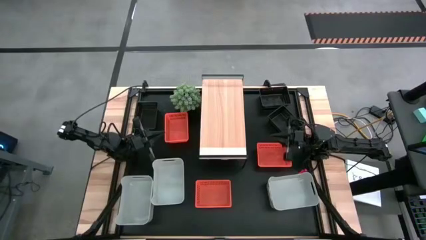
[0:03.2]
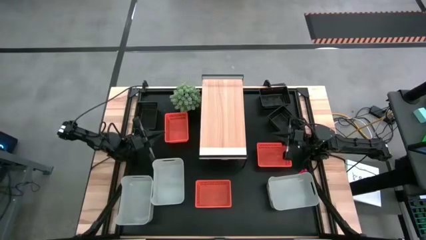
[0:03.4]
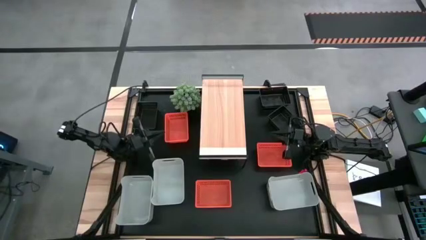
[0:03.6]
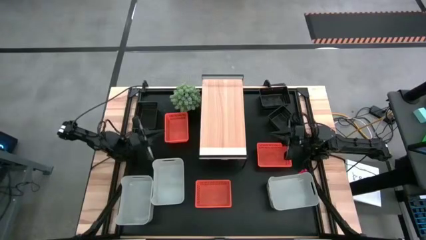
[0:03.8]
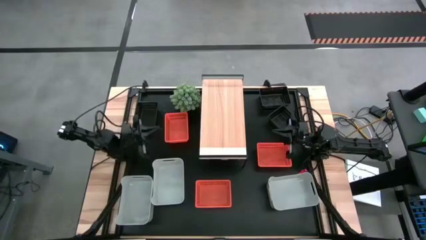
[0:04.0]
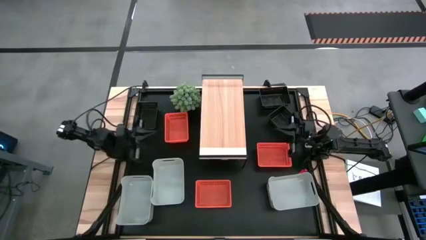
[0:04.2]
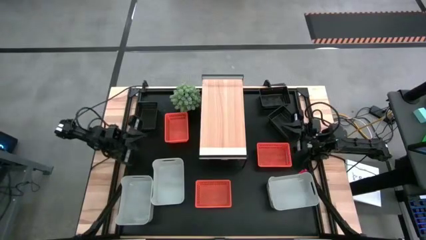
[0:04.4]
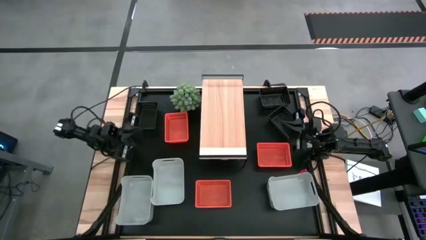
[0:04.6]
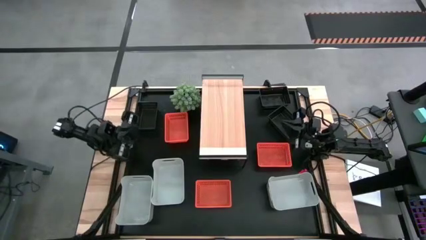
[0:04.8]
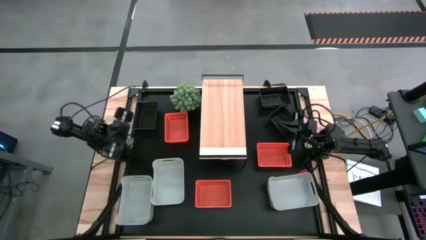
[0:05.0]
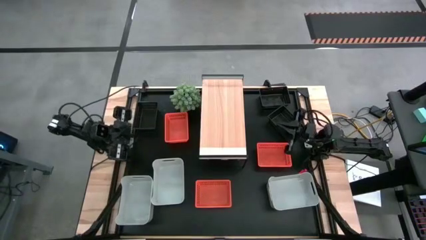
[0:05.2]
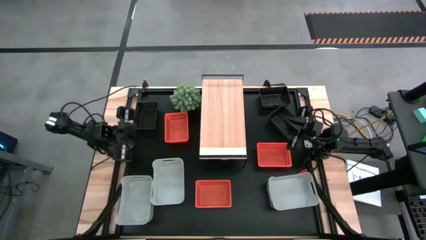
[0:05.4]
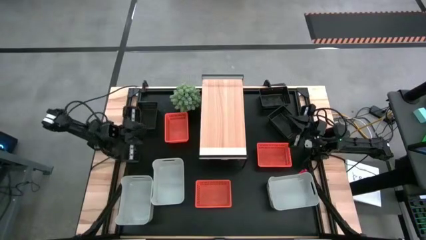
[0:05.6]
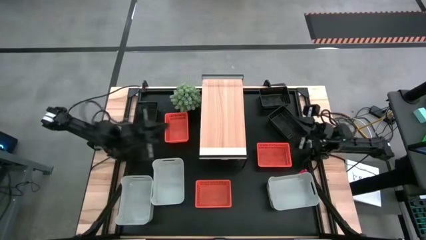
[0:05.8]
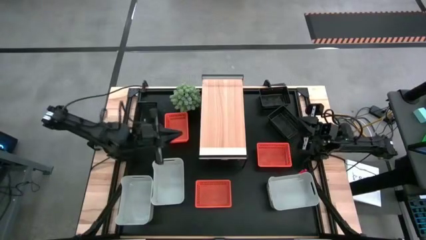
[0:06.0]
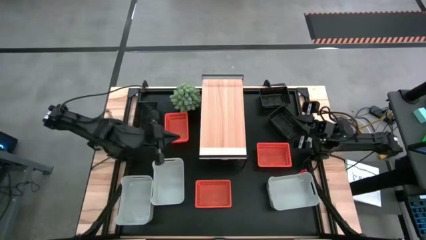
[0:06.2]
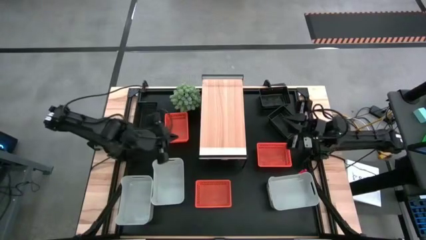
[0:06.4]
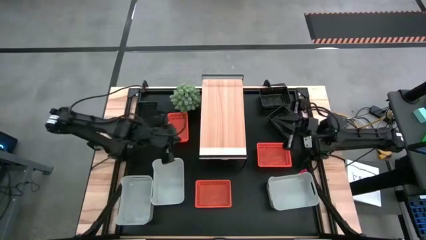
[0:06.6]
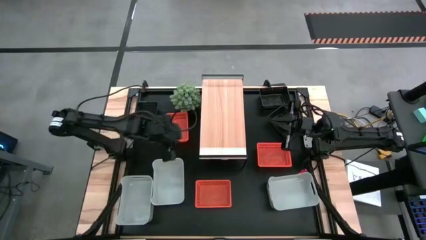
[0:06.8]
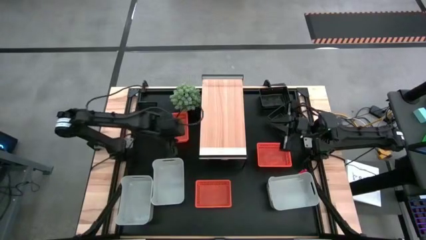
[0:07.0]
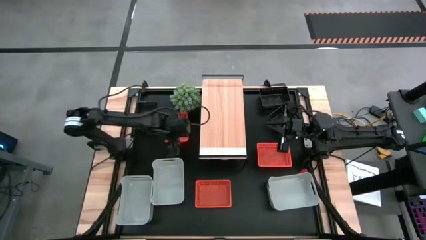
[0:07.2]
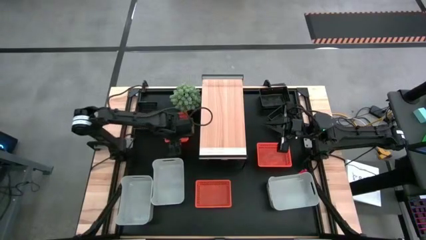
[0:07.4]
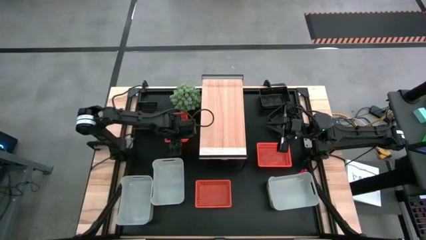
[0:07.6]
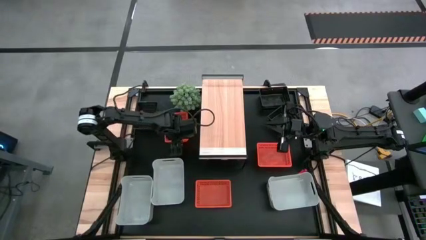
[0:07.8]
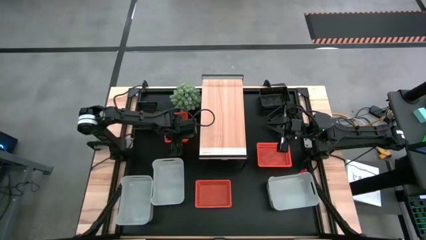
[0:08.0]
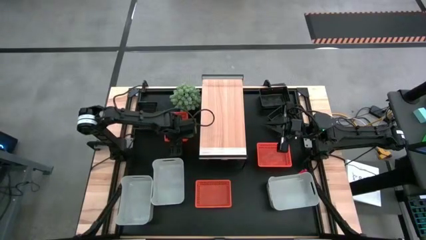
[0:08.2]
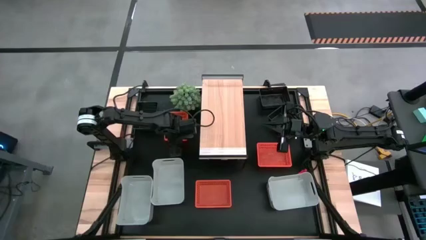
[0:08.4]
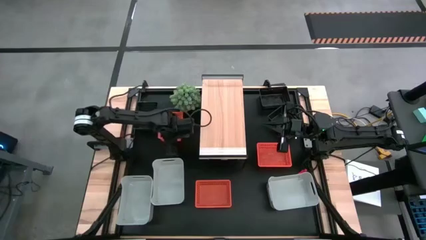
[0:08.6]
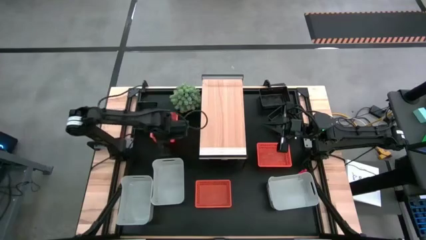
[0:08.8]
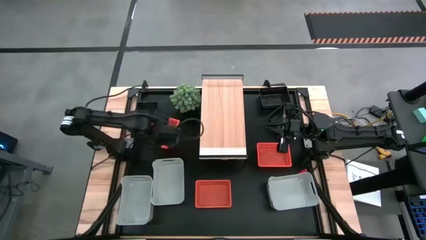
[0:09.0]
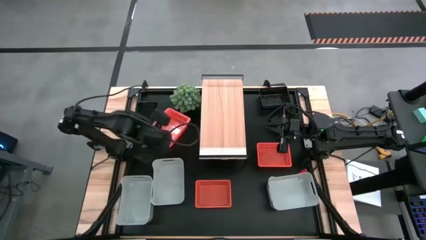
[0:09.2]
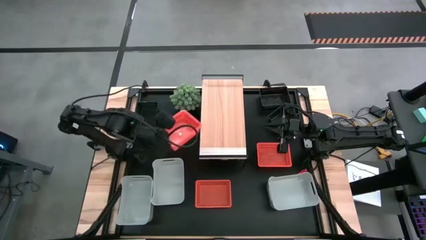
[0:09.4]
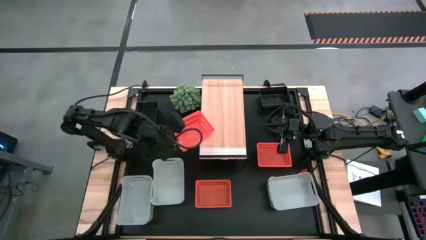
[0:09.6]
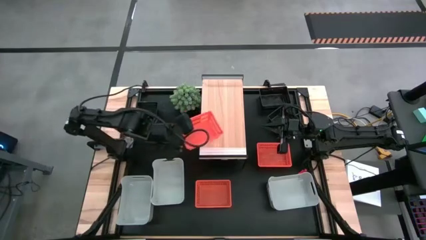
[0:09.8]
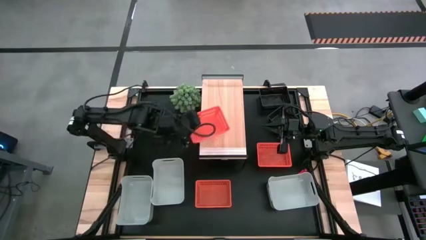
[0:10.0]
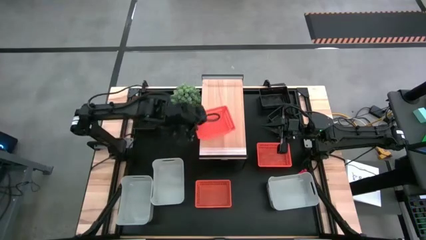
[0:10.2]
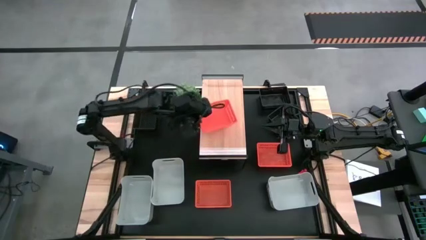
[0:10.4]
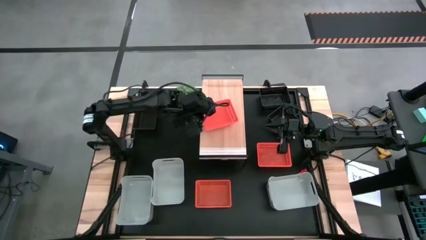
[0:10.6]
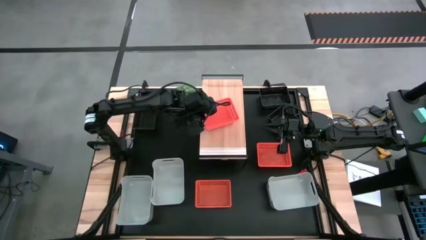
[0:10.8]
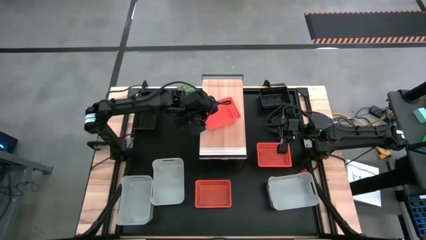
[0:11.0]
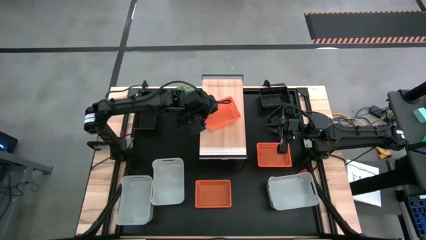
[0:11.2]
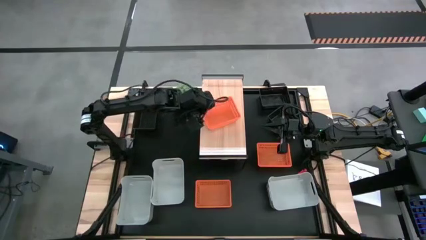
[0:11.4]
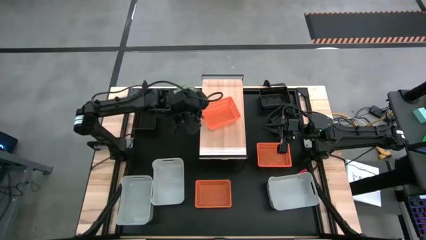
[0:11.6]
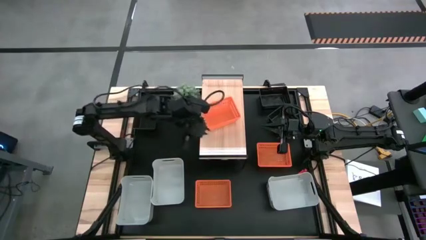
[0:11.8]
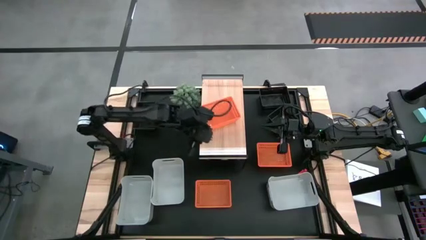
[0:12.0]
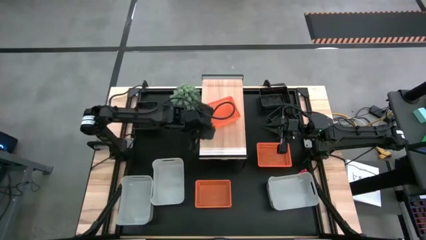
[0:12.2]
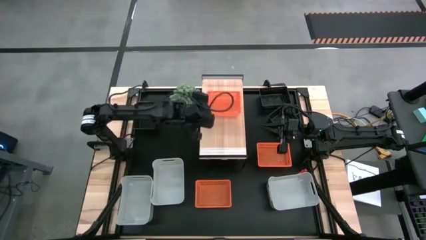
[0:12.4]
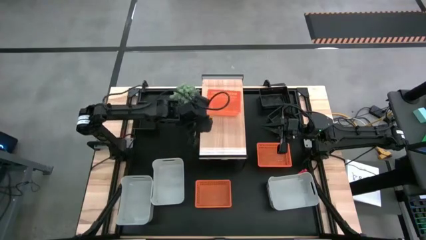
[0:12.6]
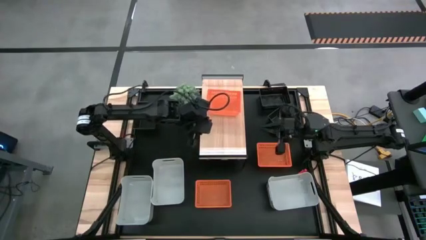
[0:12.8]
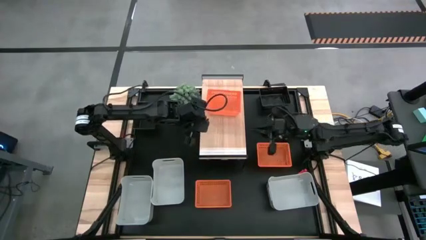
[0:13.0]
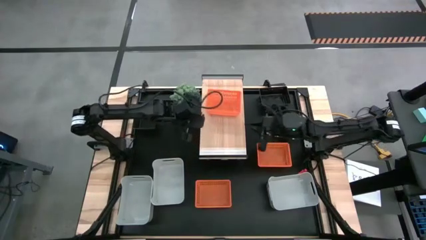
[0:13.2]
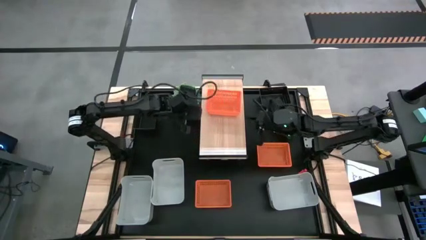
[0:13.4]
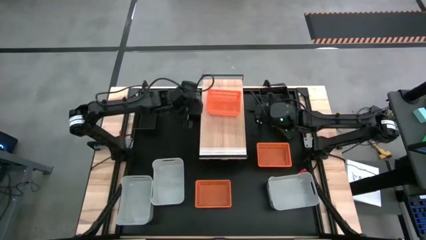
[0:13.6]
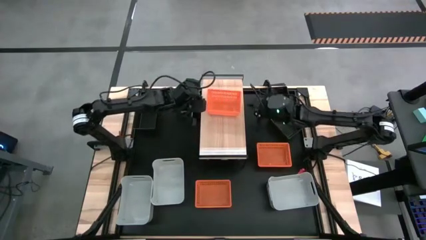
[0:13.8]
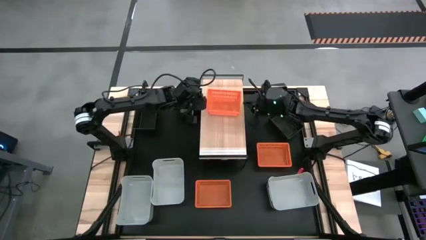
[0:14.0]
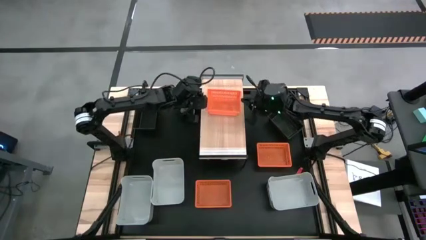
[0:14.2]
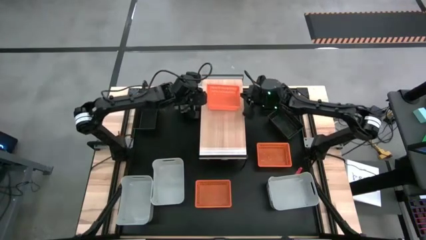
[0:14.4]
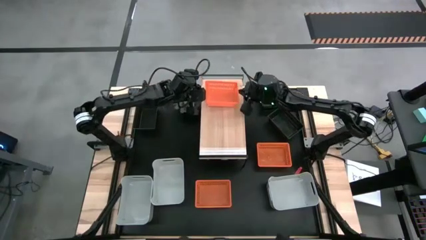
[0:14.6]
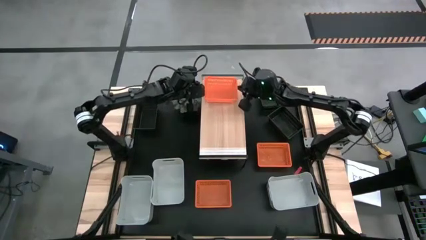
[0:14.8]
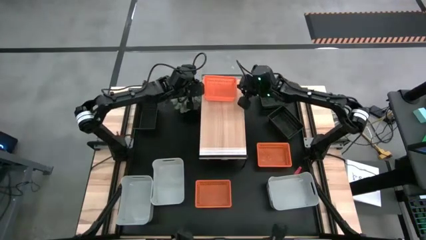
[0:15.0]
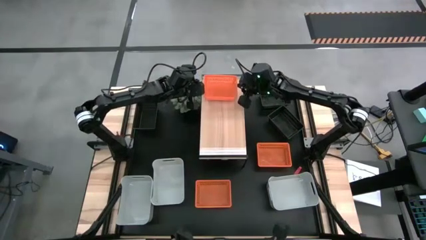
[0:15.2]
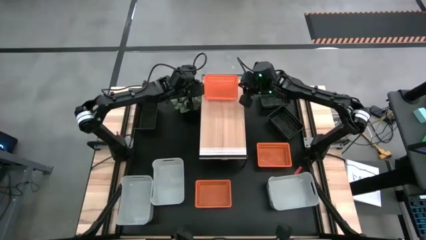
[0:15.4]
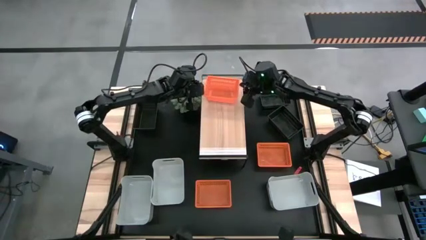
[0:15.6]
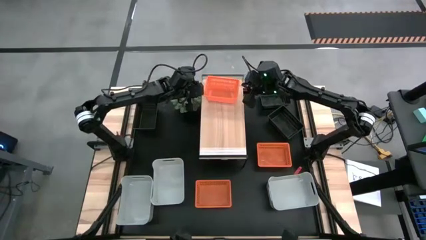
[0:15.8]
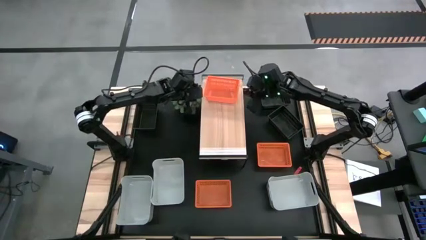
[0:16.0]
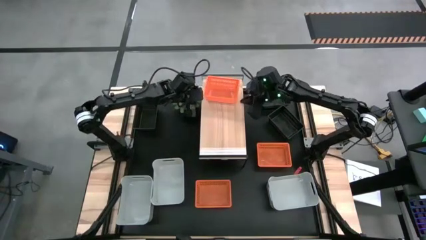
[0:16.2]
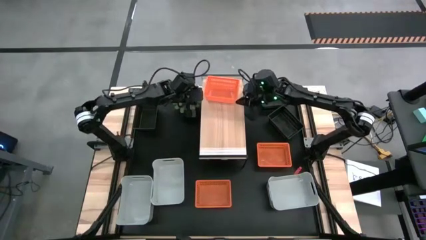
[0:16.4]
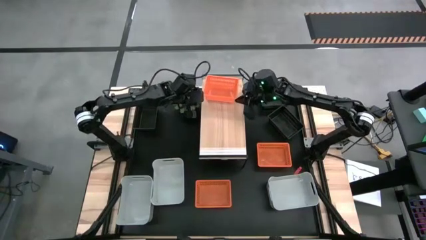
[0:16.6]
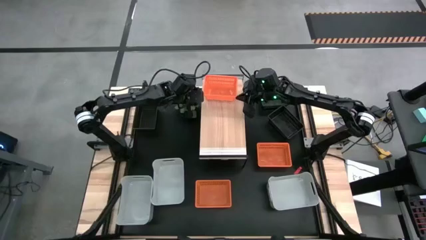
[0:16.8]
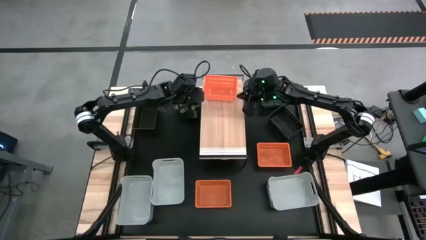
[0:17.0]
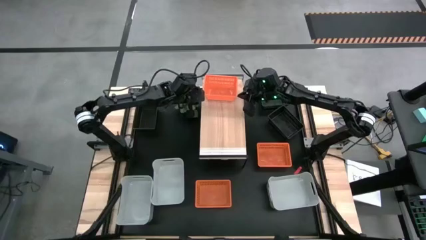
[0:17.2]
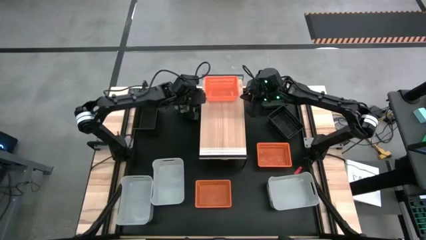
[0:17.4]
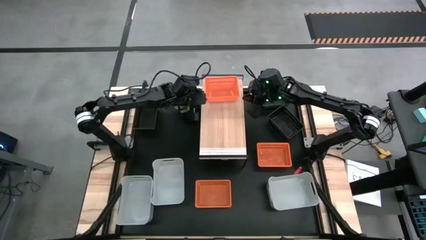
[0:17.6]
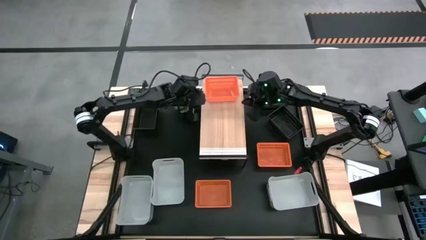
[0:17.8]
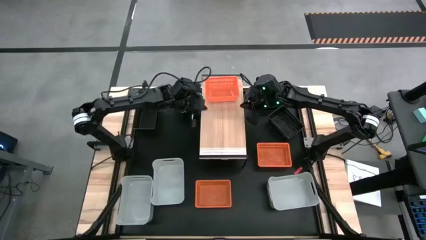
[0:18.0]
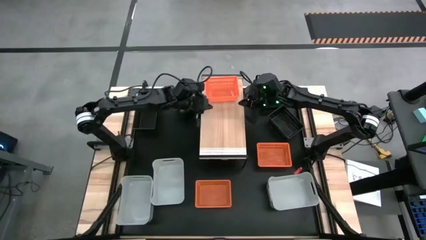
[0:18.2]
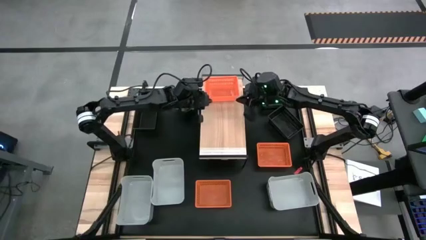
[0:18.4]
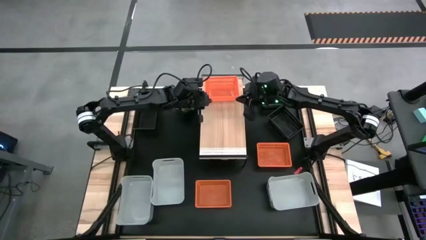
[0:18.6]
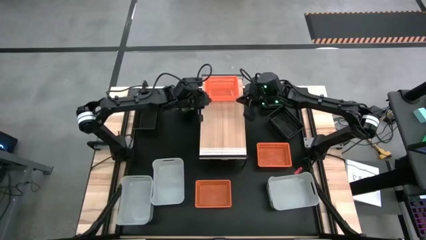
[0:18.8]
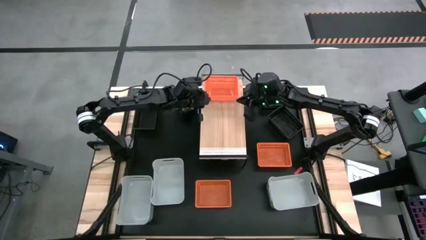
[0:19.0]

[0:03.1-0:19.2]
Task: Stack baskets on shelf by color
Put the top orange bin on the shelf
